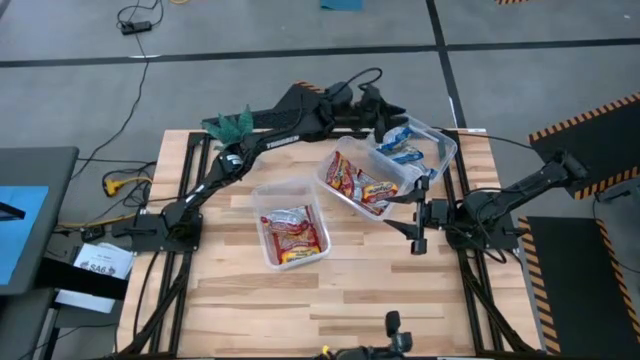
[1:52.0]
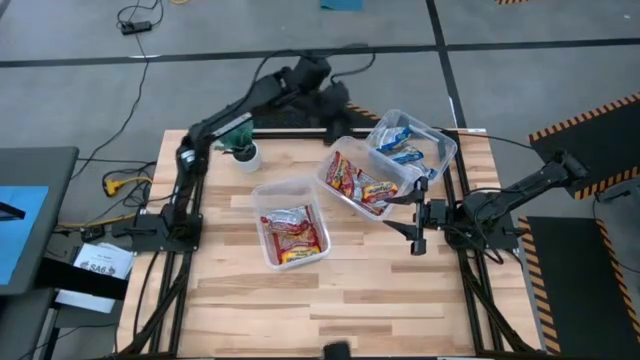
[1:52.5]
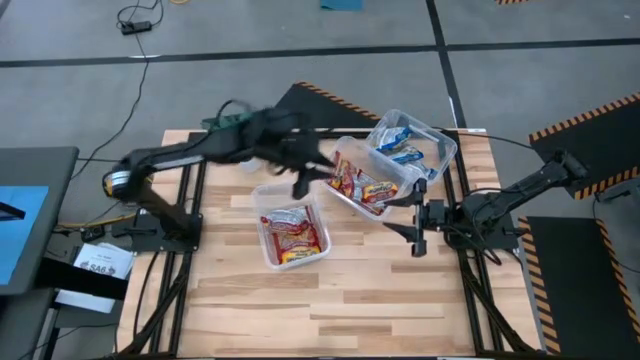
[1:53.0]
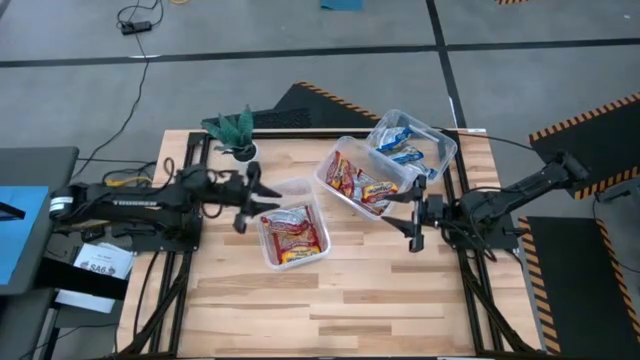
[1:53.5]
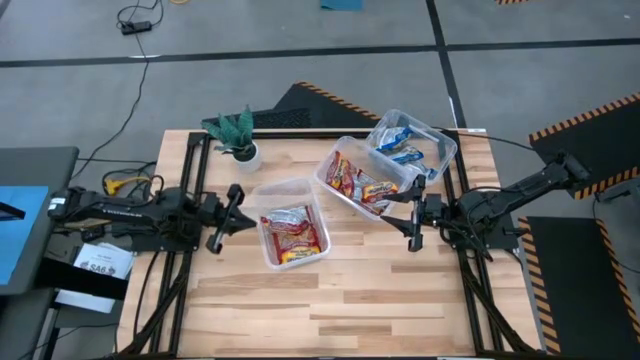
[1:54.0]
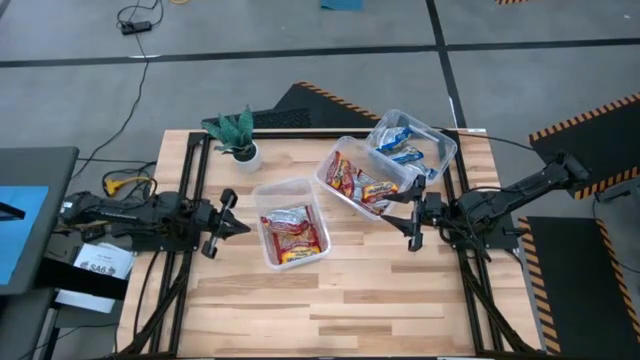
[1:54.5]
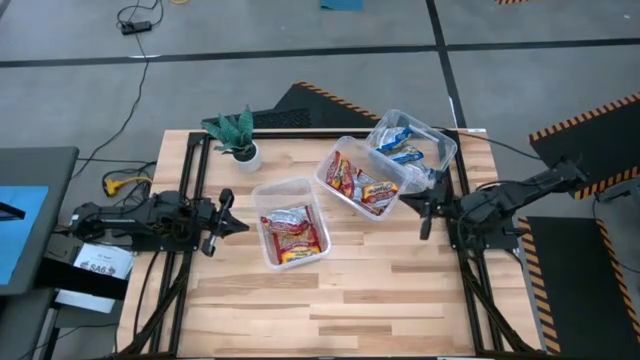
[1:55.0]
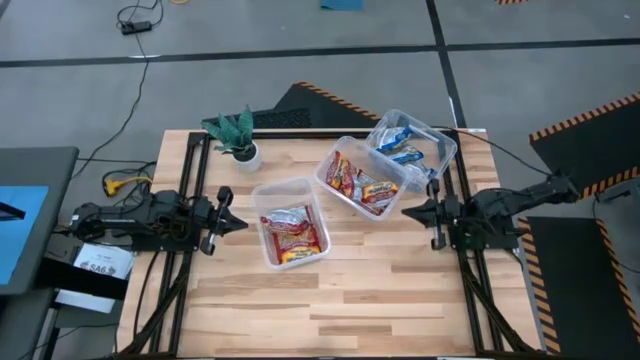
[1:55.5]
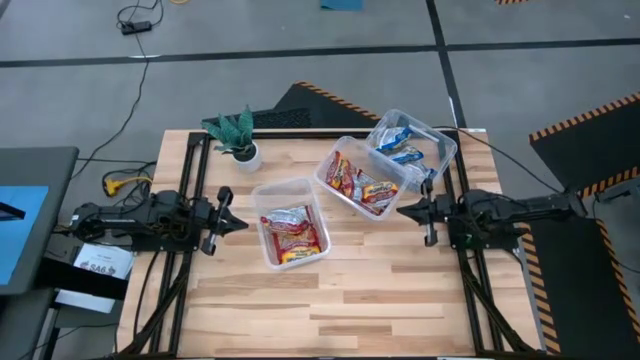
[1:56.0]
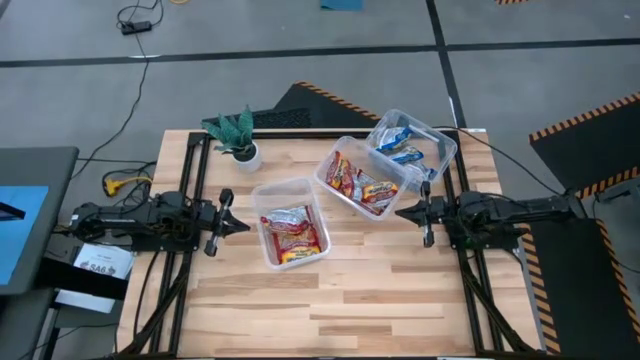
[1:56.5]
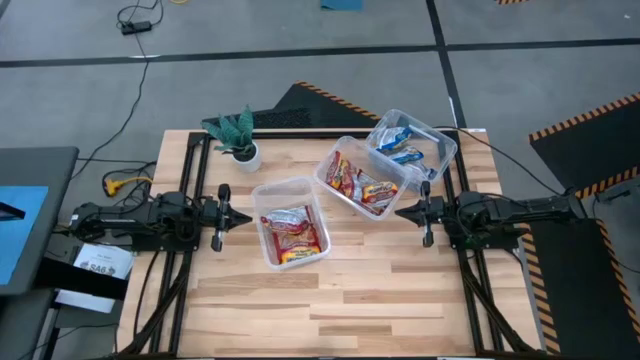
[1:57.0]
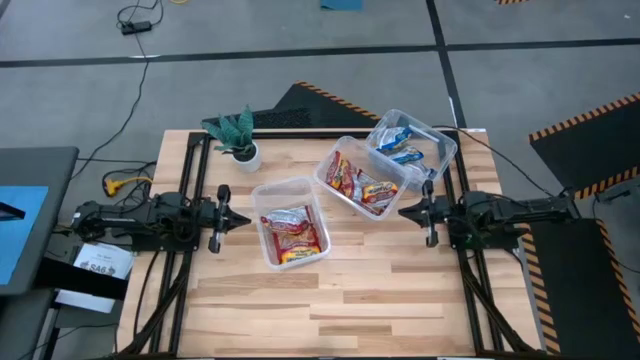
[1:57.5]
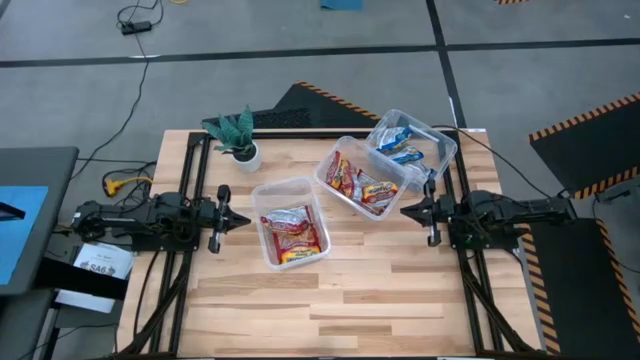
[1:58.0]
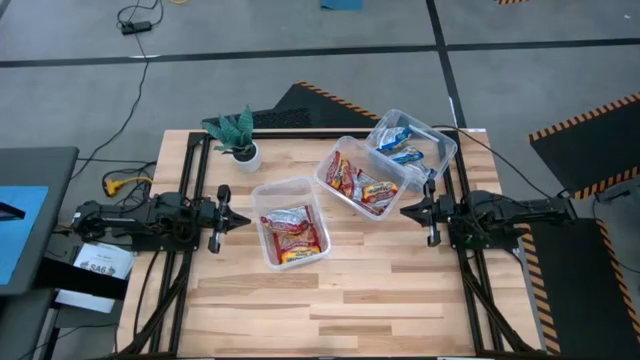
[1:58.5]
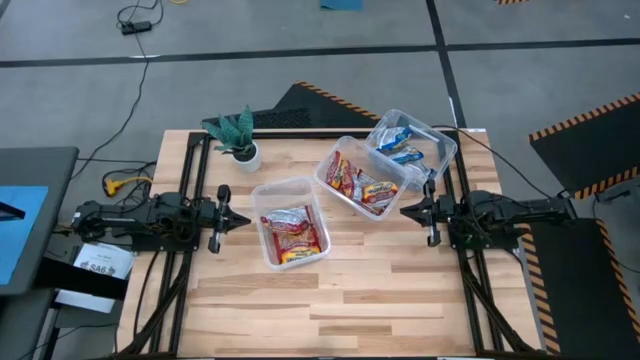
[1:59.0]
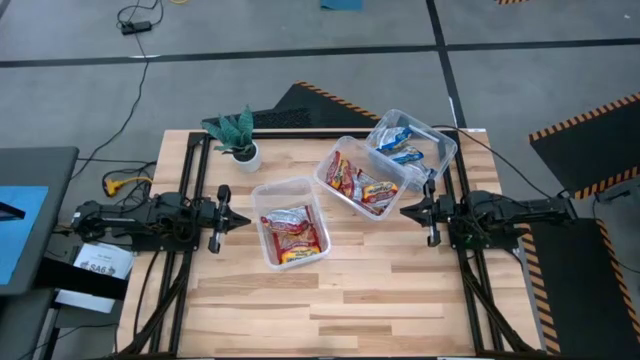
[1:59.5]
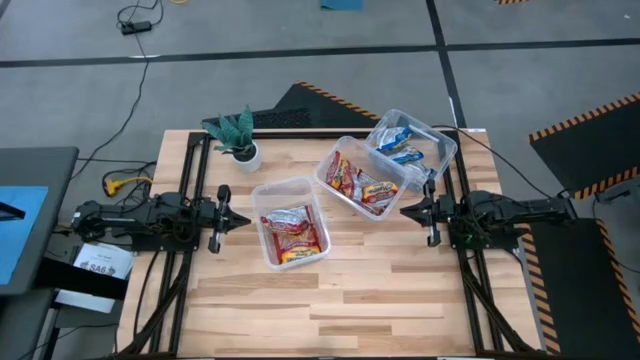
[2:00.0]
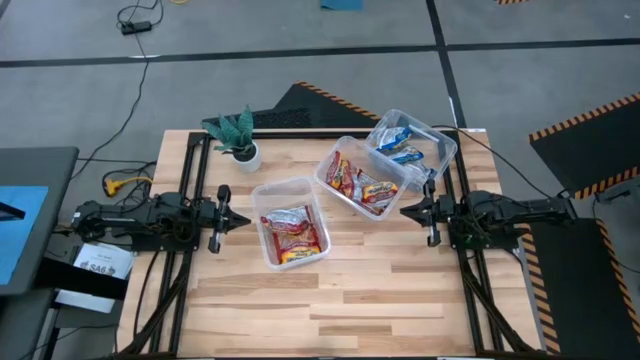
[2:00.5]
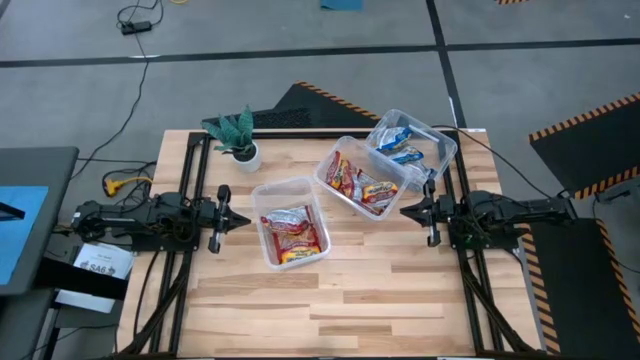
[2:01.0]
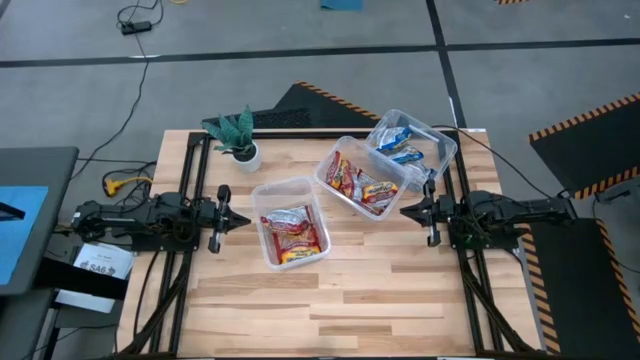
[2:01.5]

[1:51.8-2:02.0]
Task: Sort Maruchan noodles
Return to Home Position

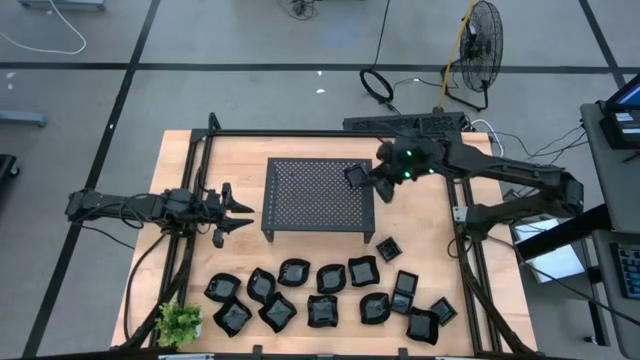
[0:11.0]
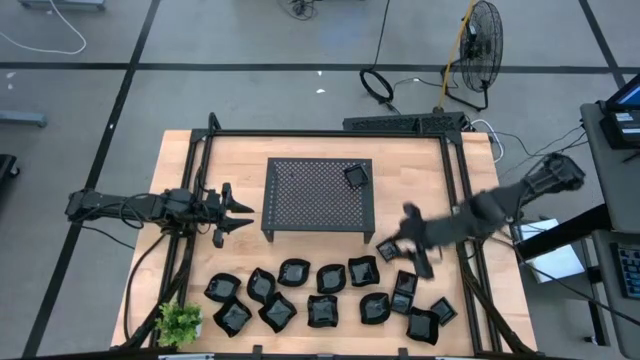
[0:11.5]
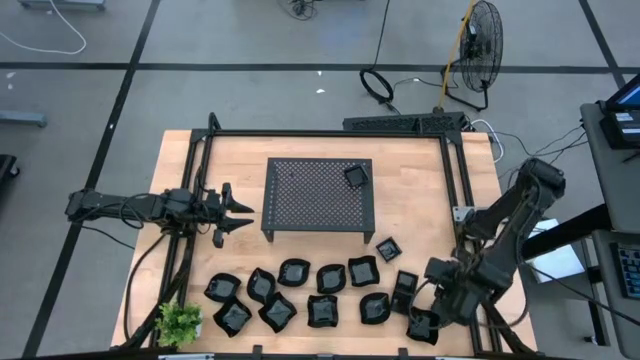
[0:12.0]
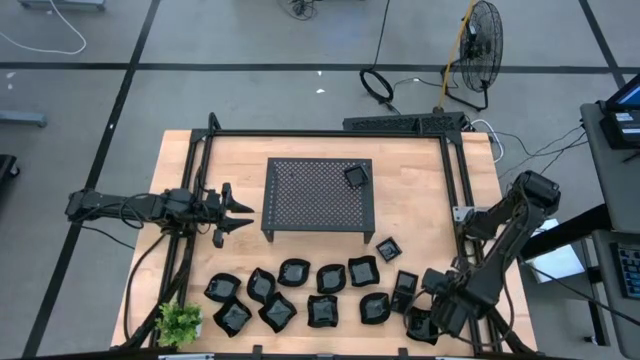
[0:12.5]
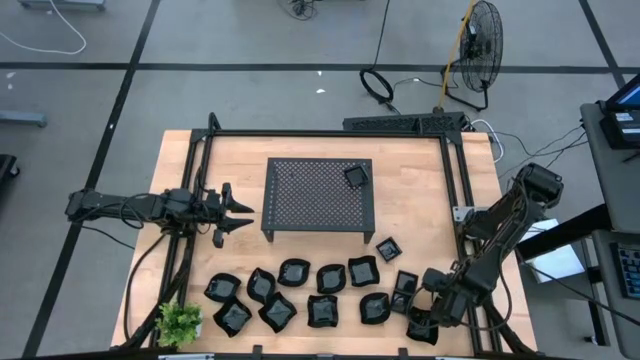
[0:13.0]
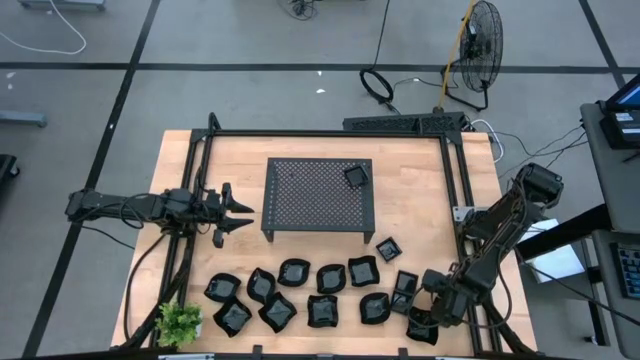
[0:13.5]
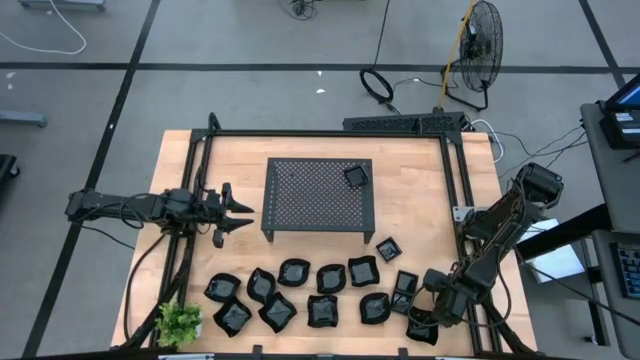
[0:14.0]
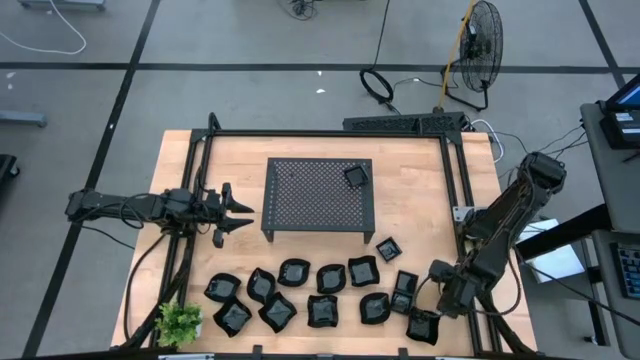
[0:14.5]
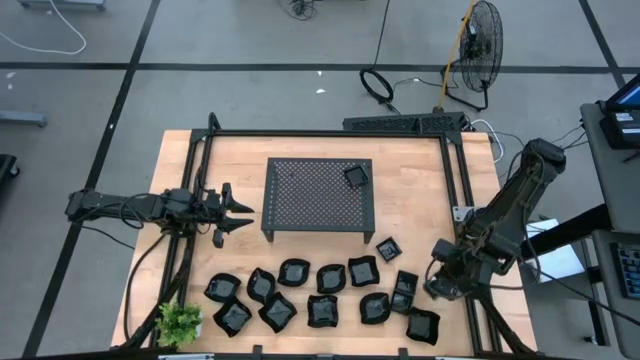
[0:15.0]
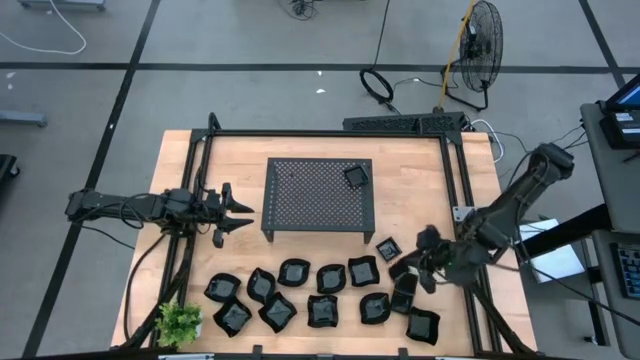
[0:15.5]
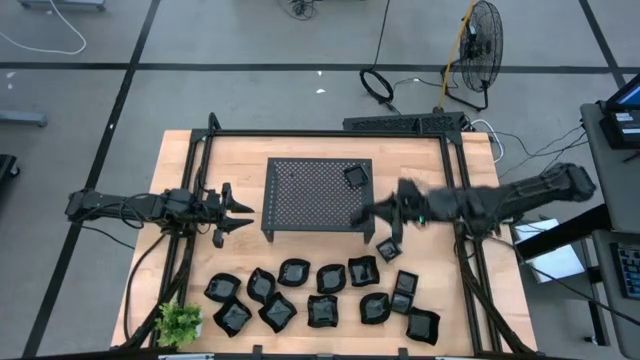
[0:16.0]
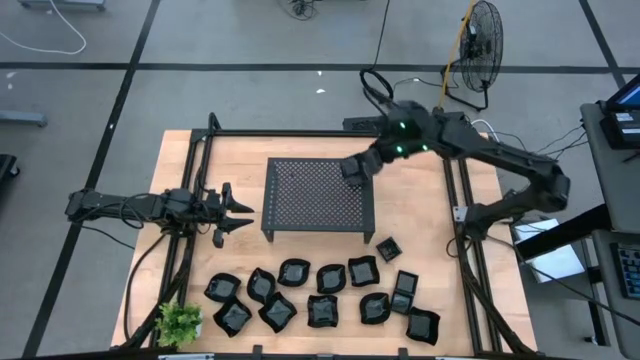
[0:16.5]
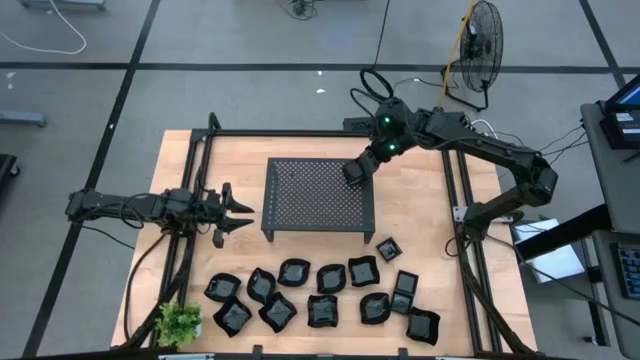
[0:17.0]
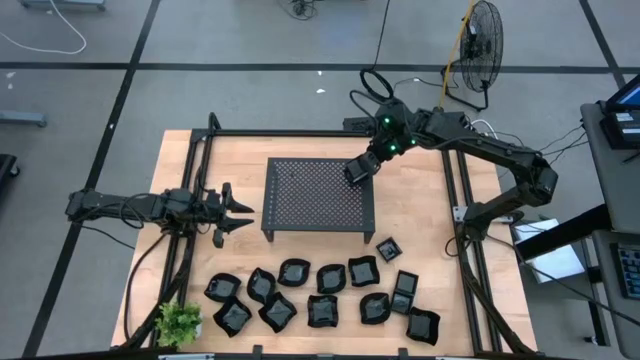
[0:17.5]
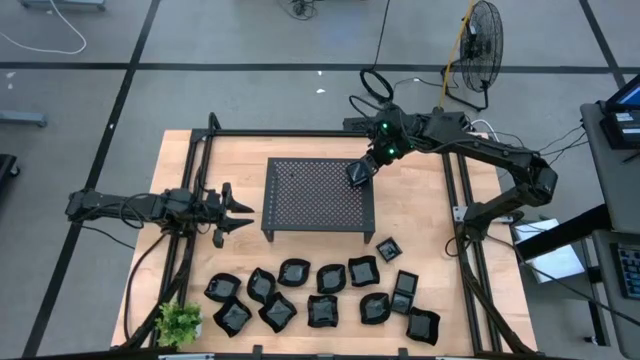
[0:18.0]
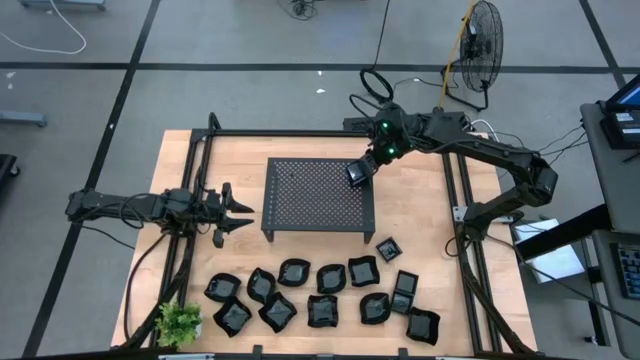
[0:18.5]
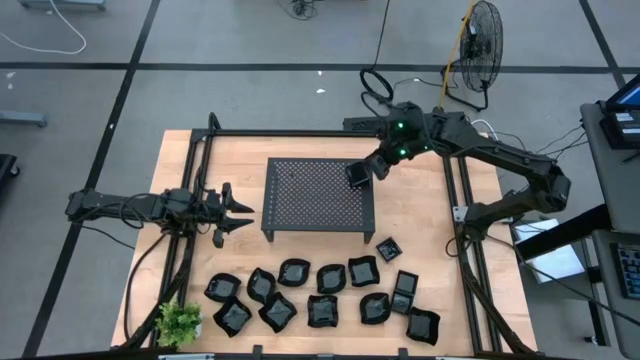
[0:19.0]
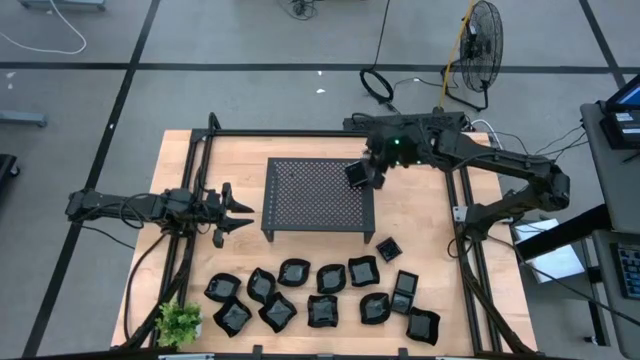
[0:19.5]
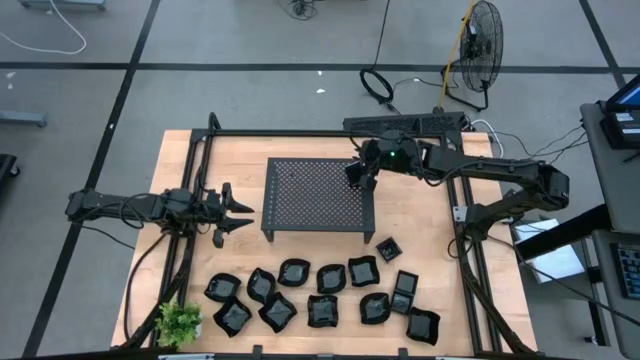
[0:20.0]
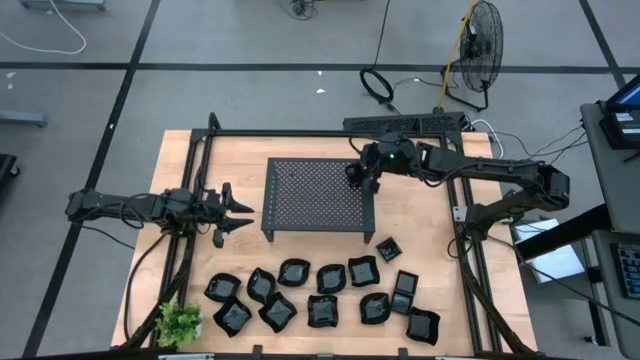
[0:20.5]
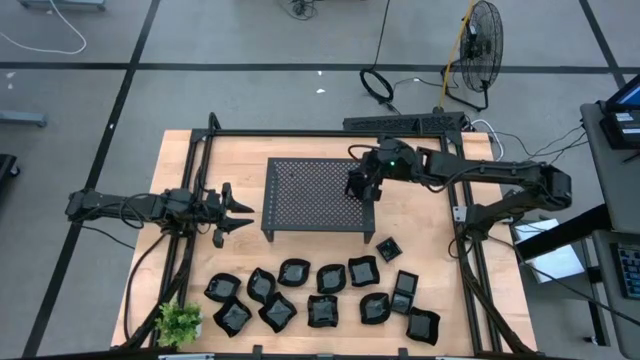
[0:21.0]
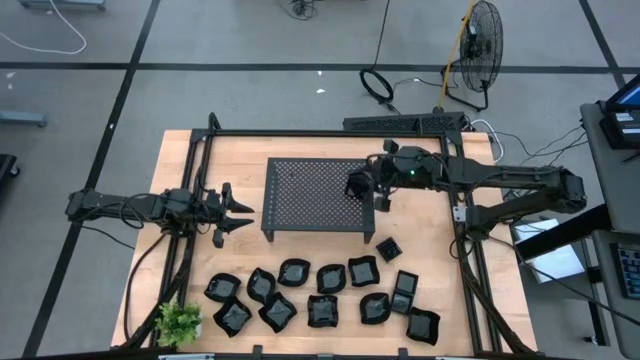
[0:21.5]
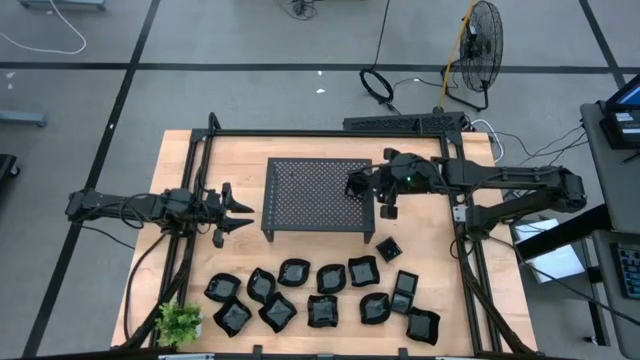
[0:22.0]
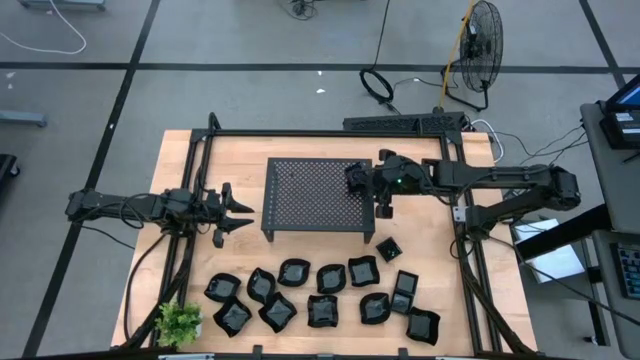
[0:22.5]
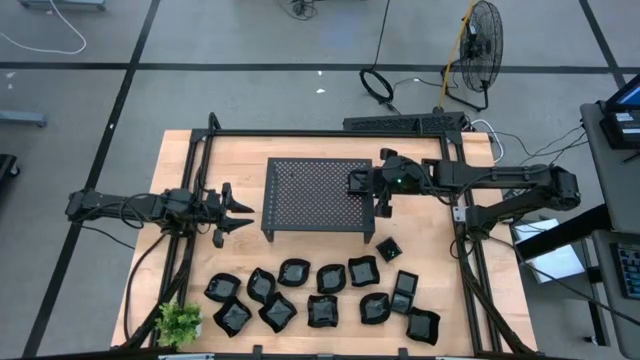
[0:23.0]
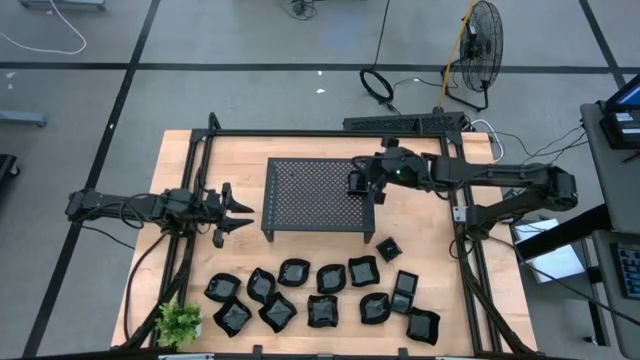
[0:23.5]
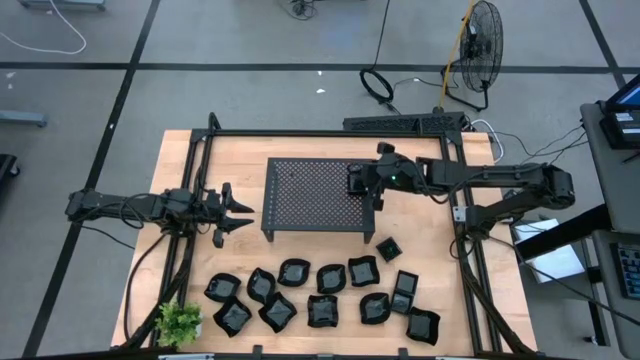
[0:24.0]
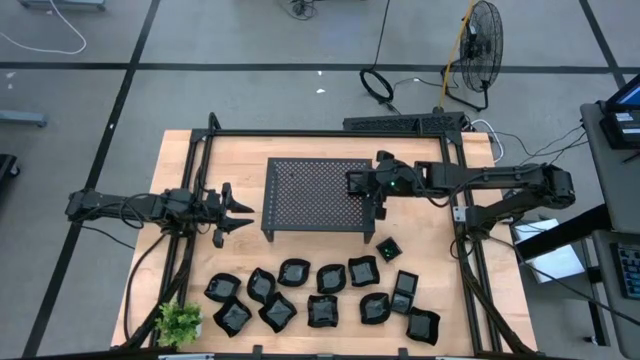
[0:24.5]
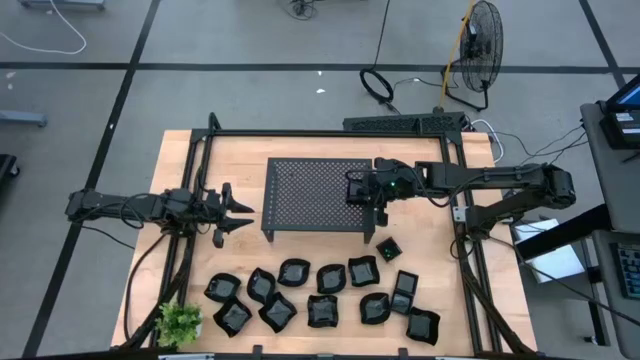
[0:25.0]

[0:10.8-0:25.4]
Task: Pick & Place Mini shaped plates
Stack the square plate on the other square plate on the shelf
